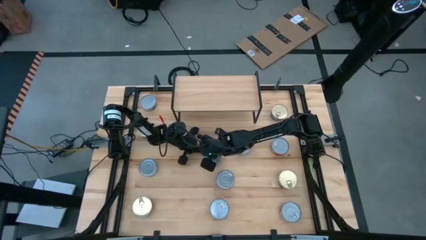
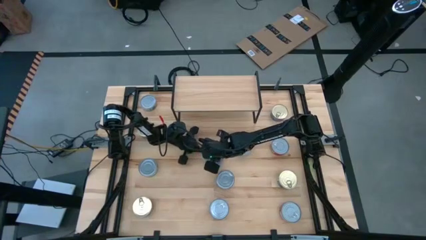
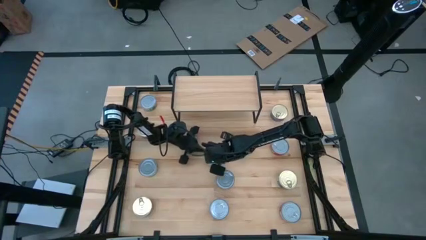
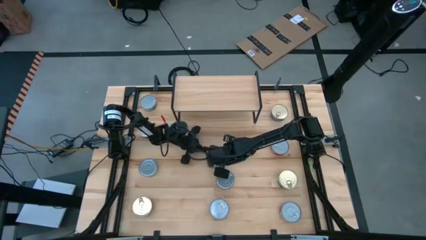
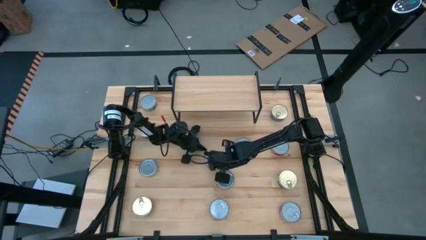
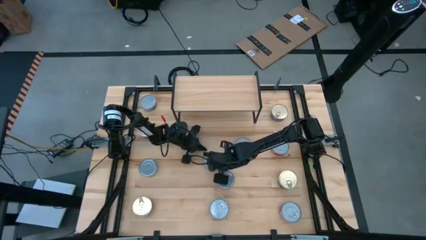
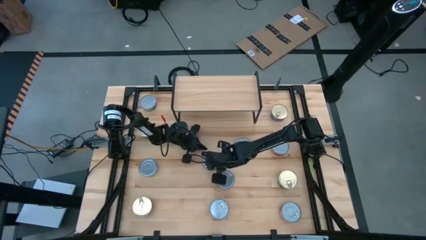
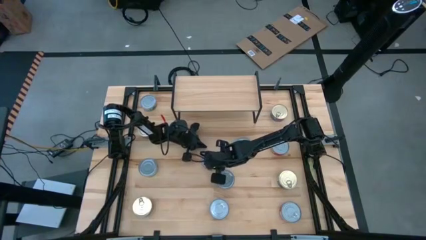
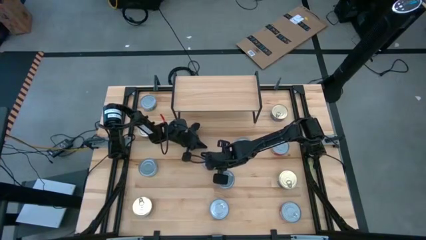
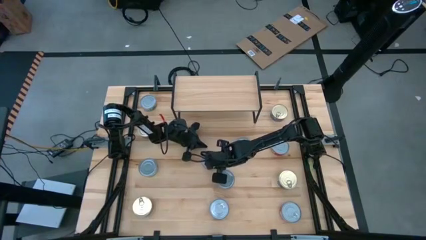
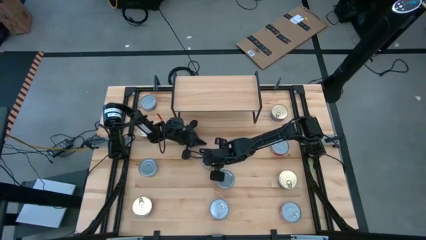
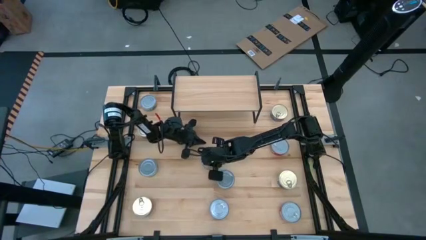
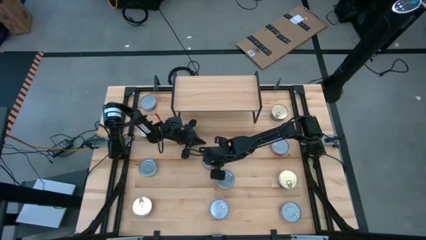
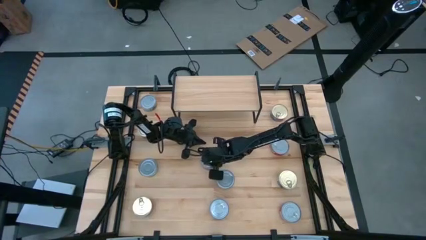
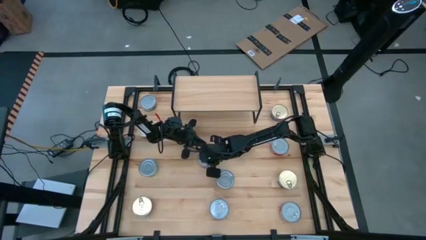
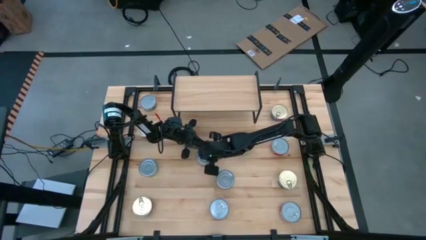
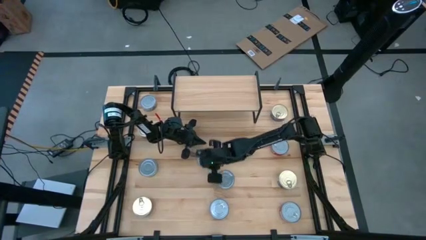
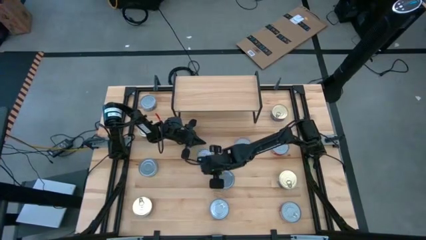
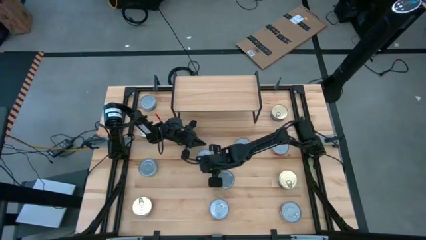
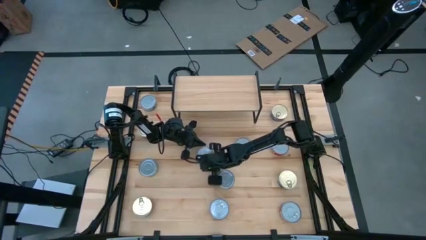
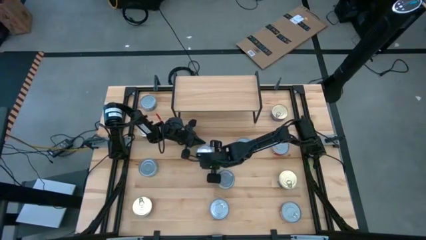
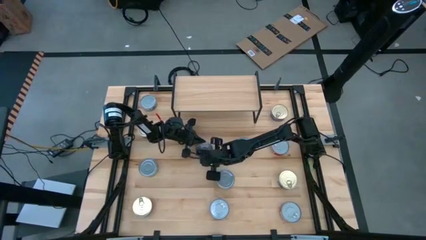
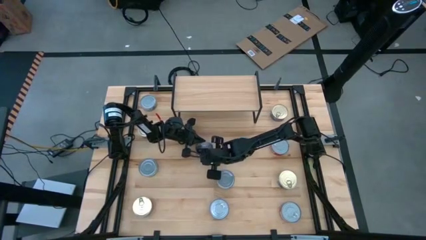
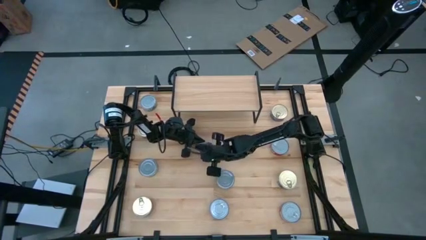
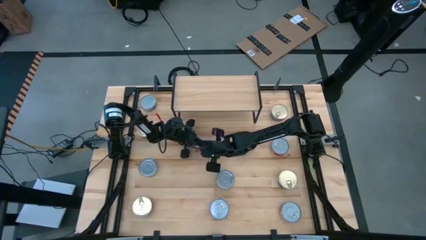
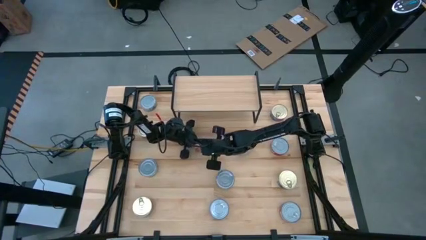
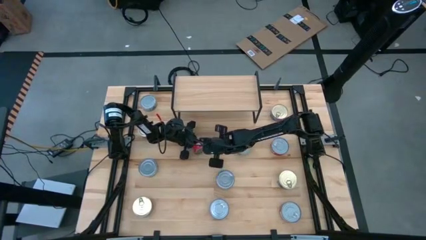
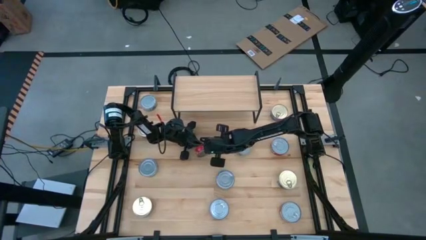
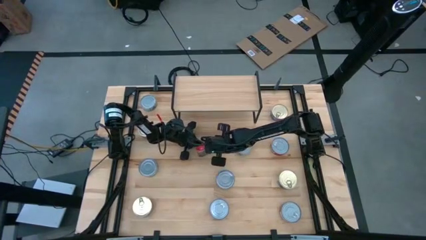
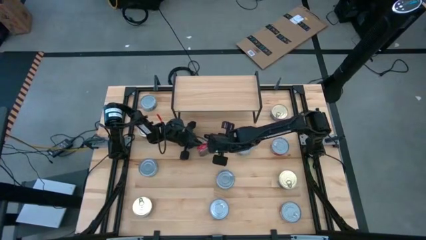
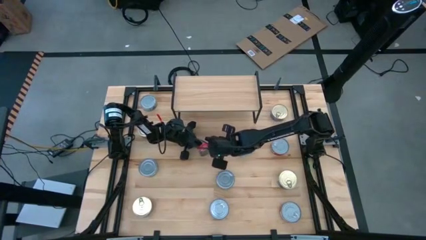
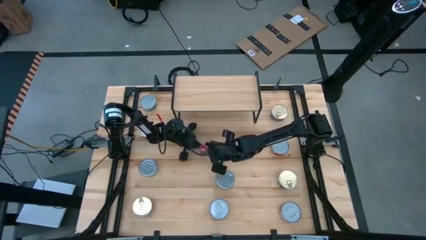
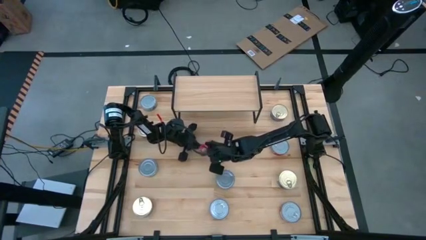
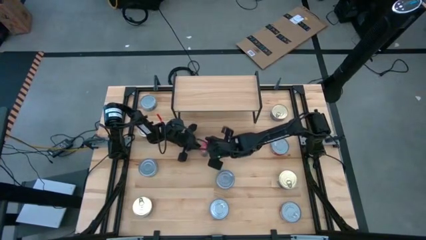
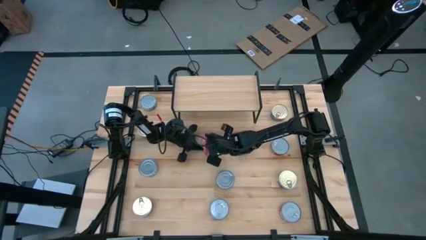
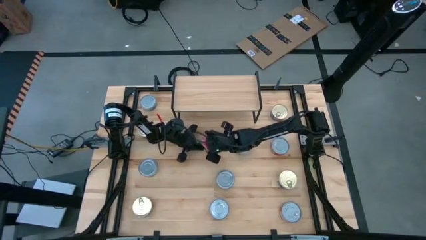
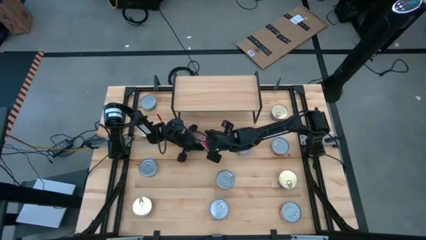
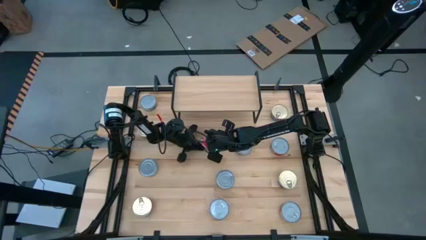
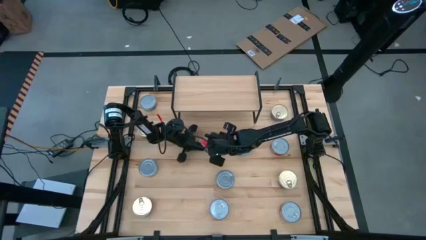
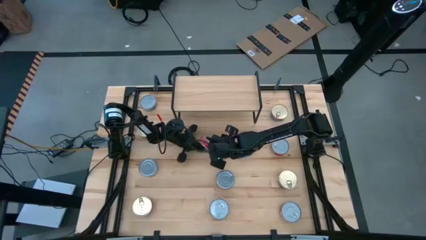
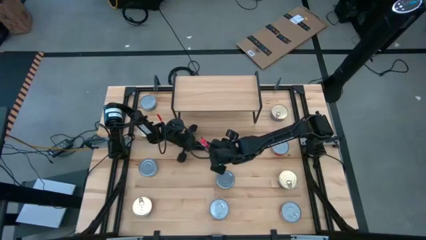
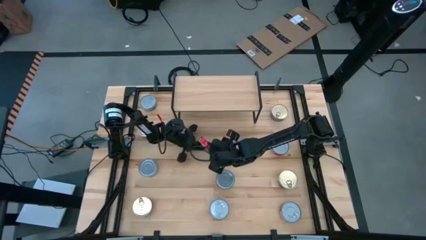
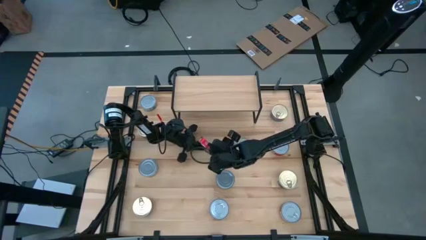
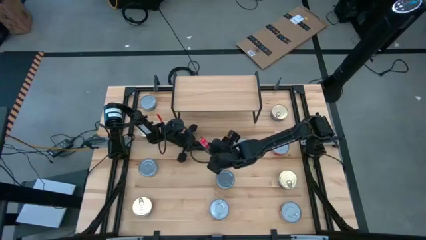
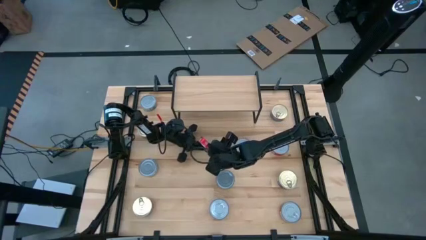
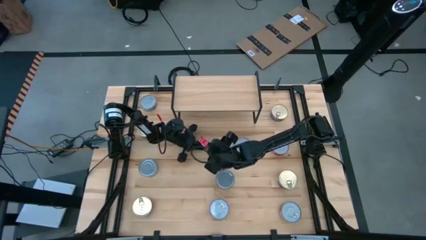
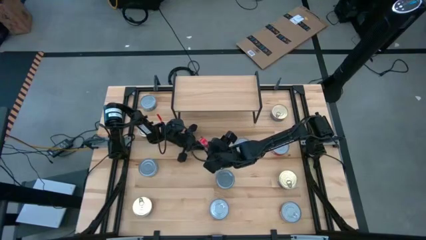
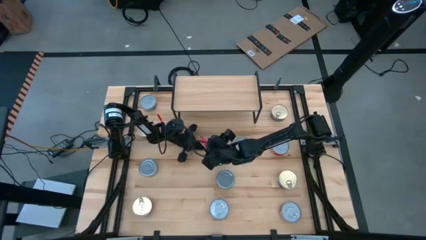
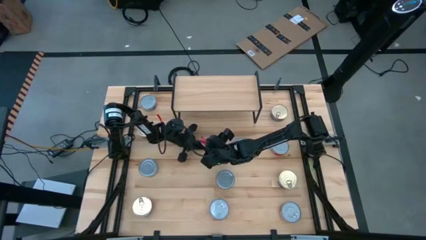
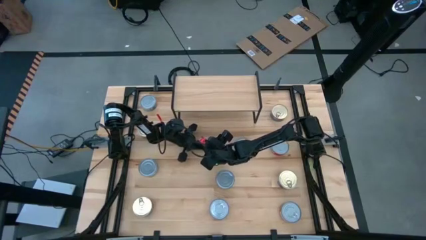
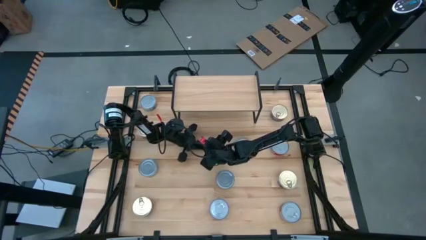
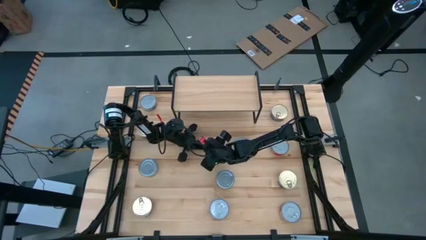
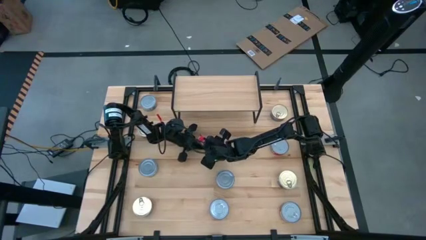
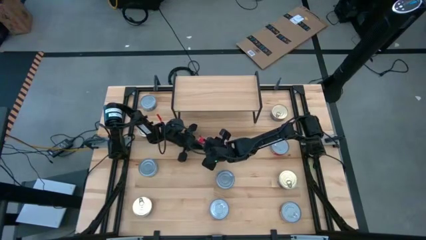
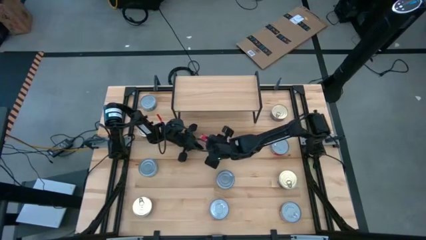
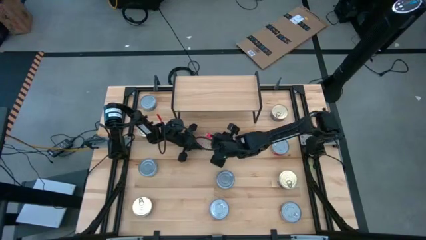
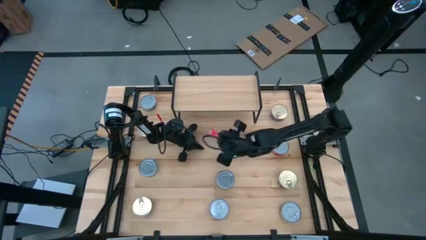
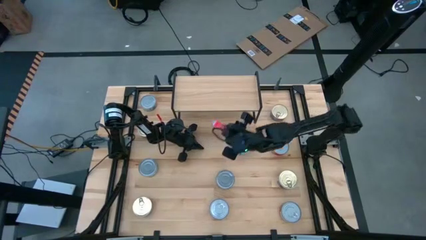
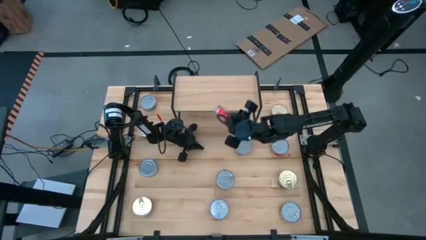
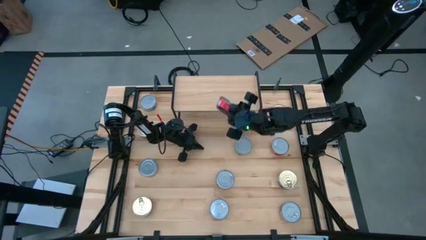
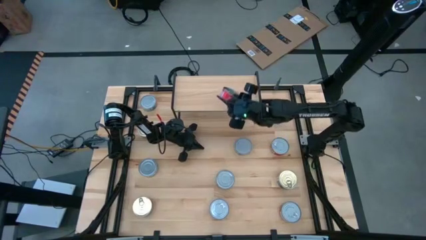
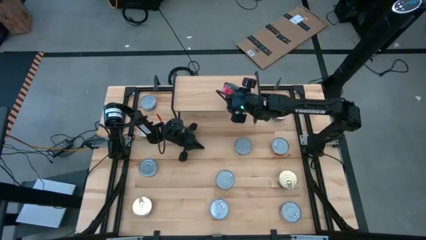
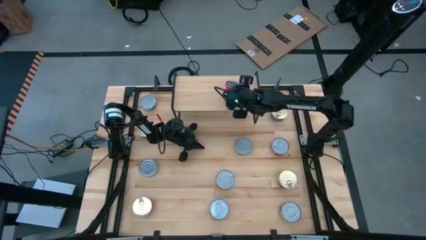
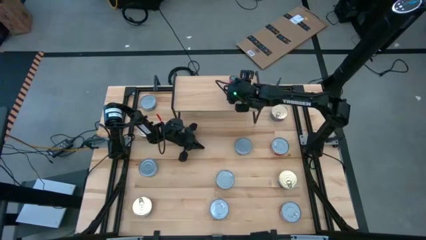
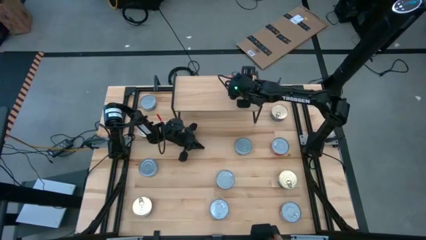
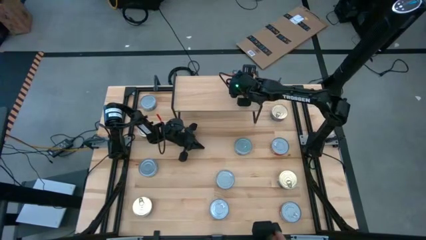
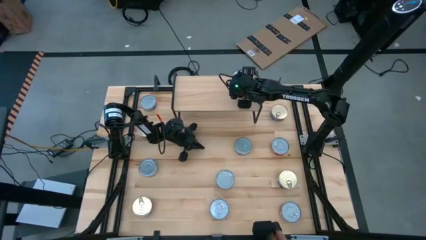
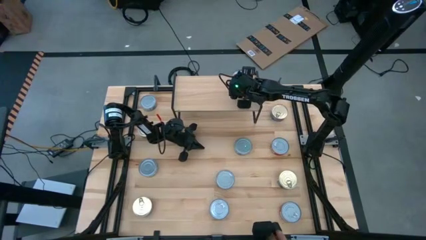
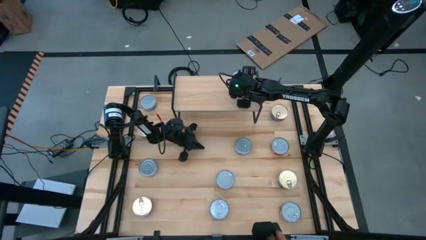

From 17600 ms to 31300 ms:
Task: Stack canned seafood by type on shelf
Put the red tuna can on the shelf

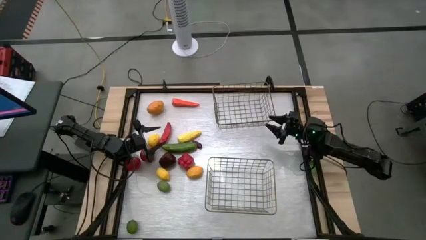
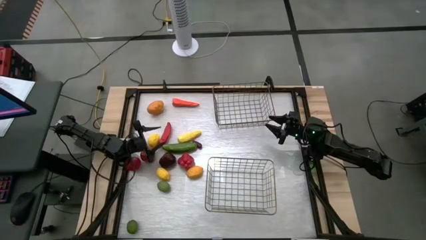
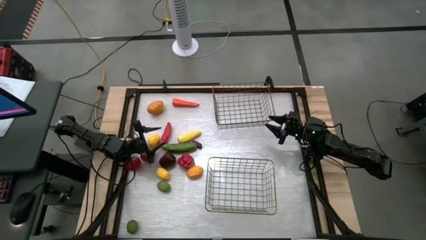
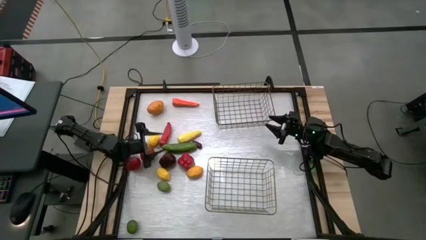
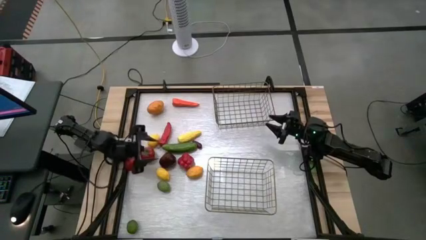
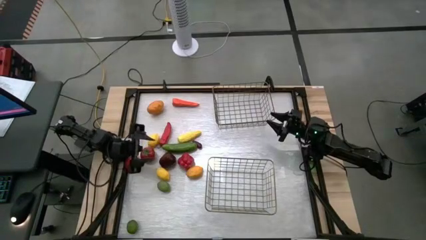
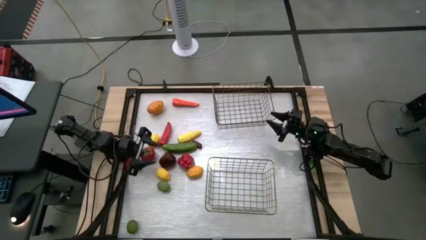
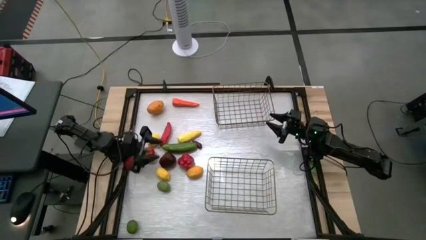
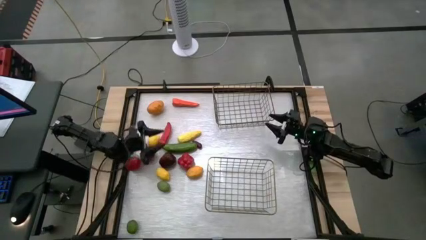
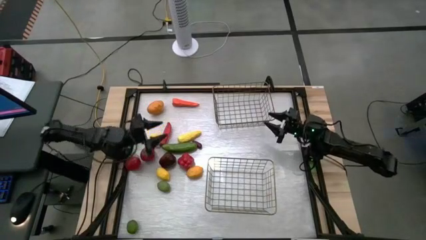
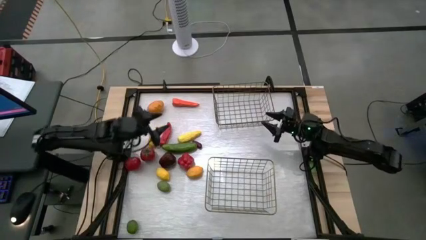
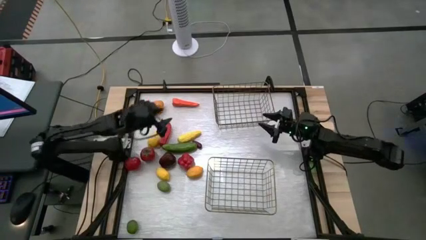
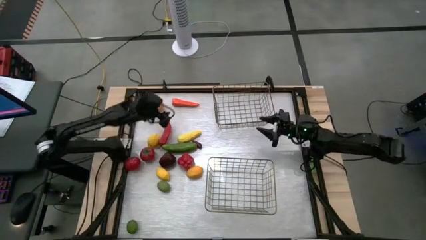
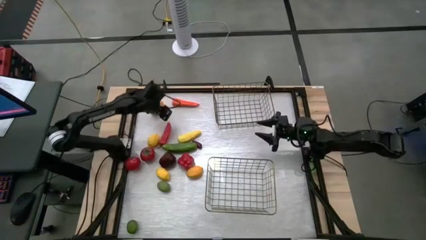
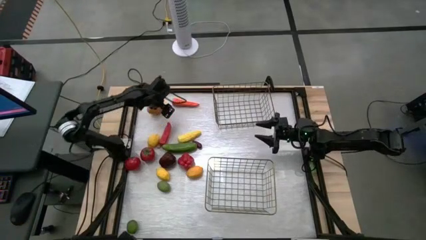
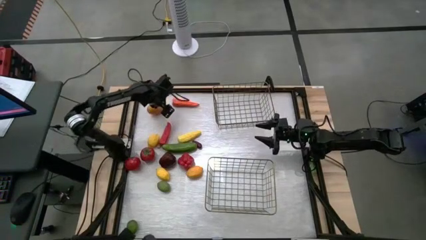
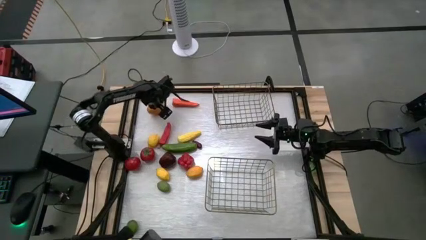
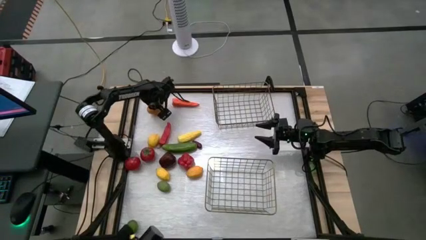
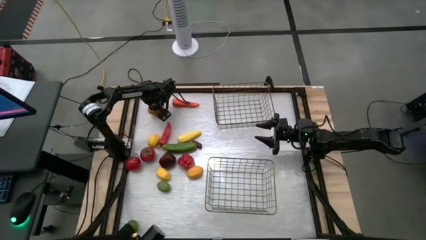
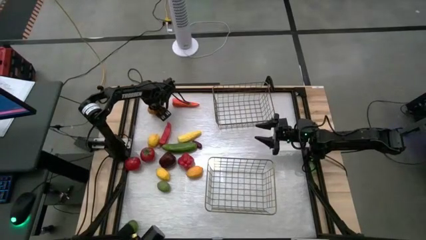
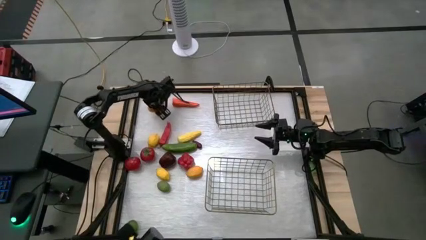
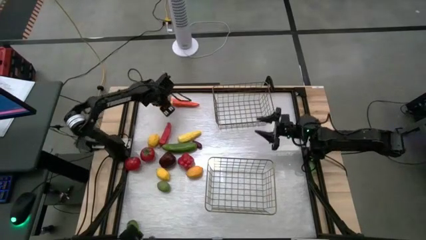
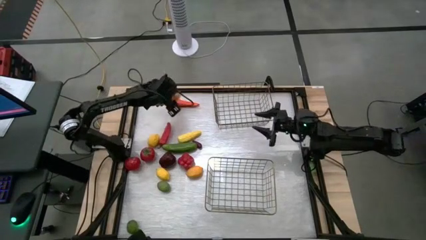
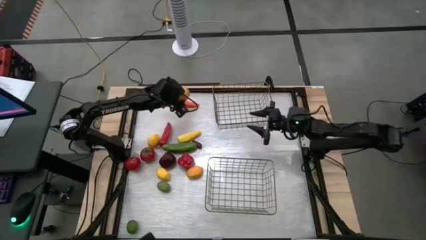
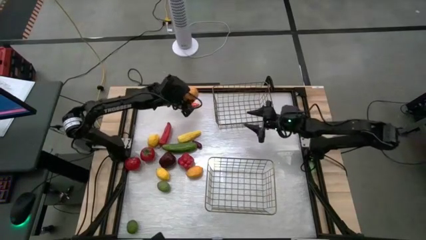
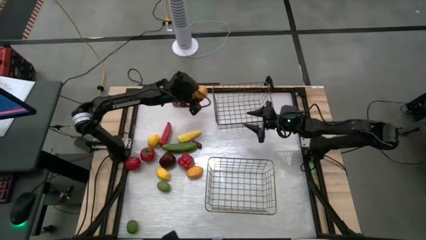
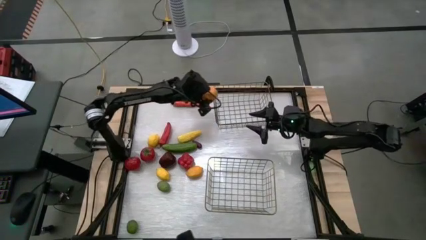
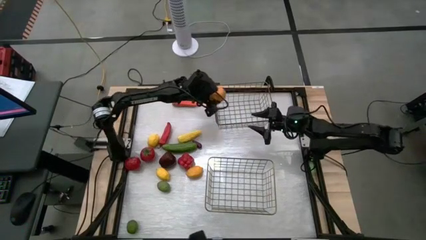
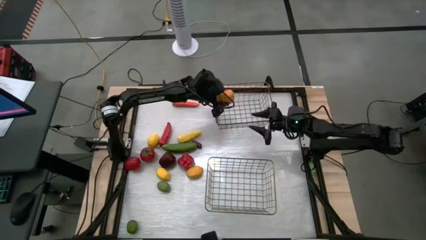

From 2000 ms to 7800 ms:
Task: Sort produce into baskets
Put the brown potato into the top wire basket
